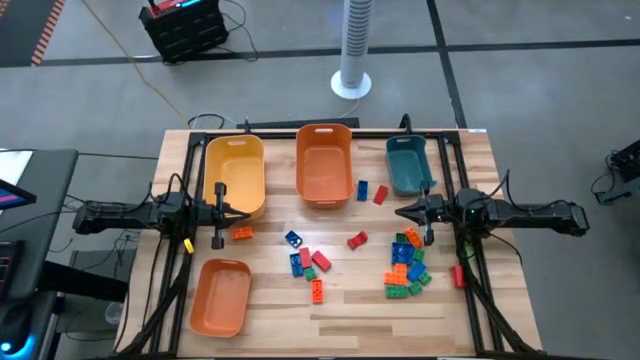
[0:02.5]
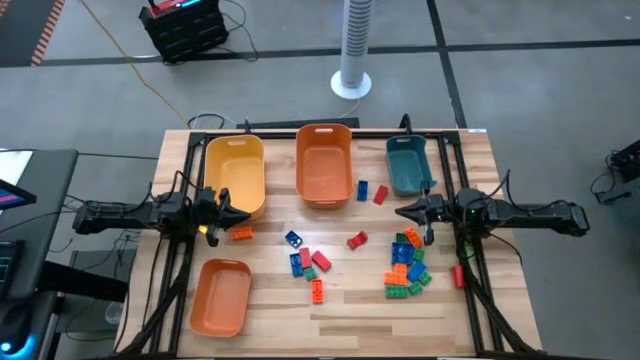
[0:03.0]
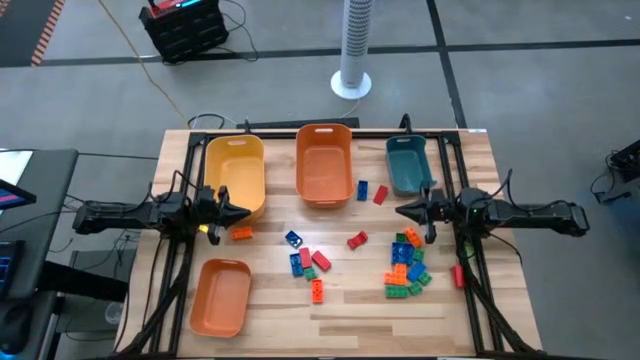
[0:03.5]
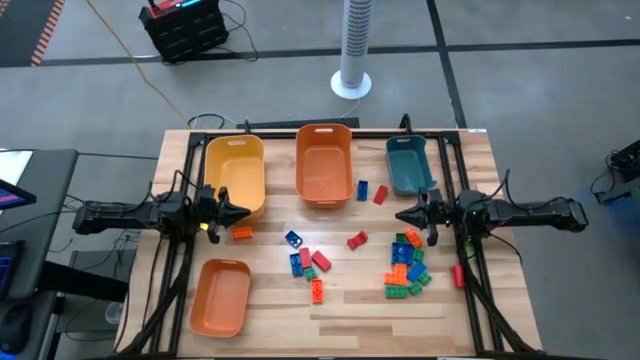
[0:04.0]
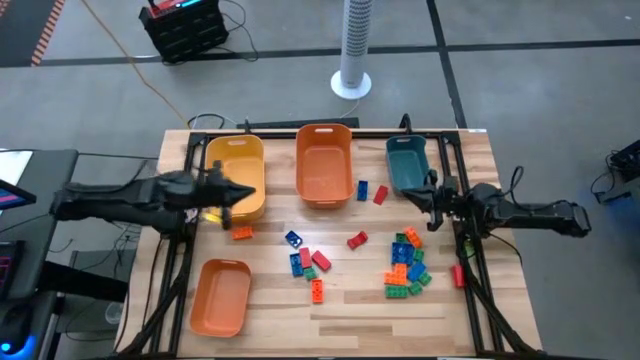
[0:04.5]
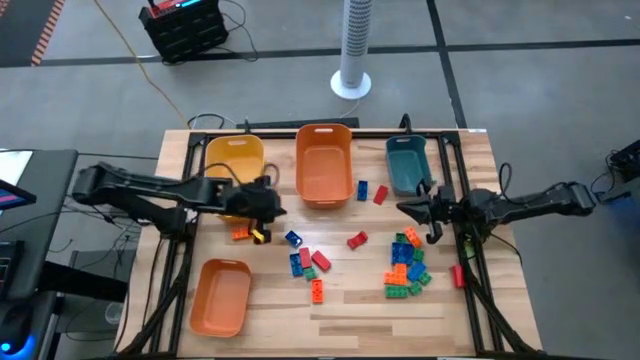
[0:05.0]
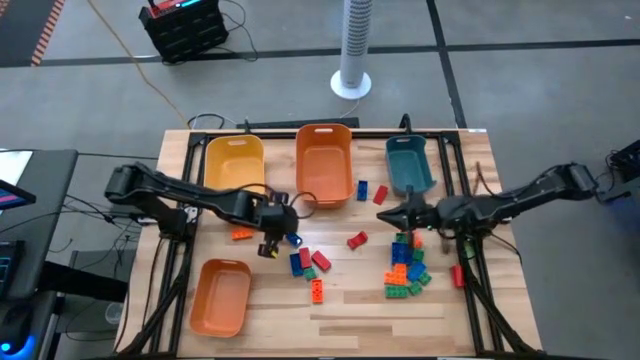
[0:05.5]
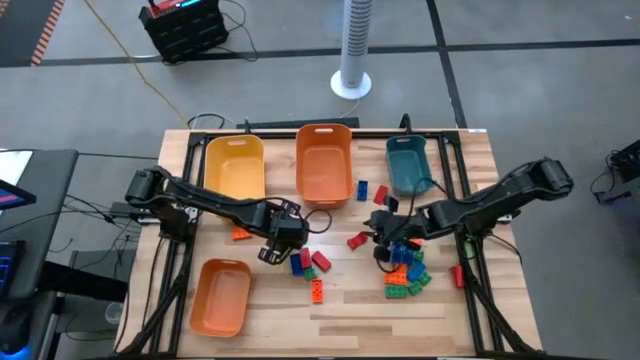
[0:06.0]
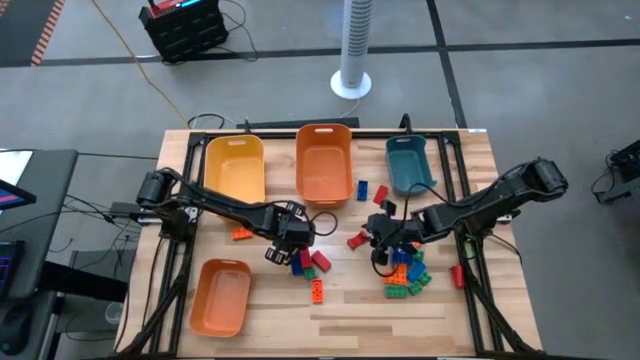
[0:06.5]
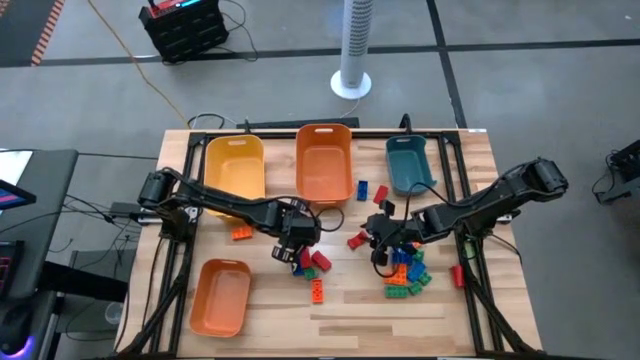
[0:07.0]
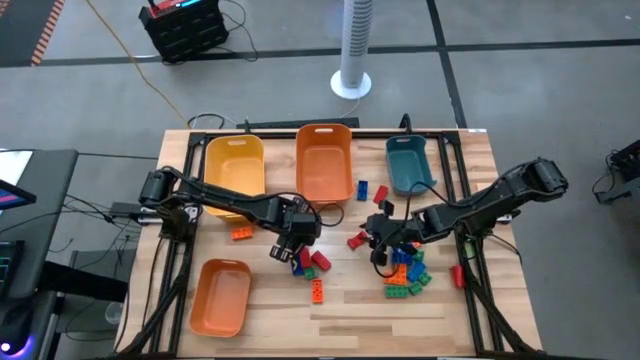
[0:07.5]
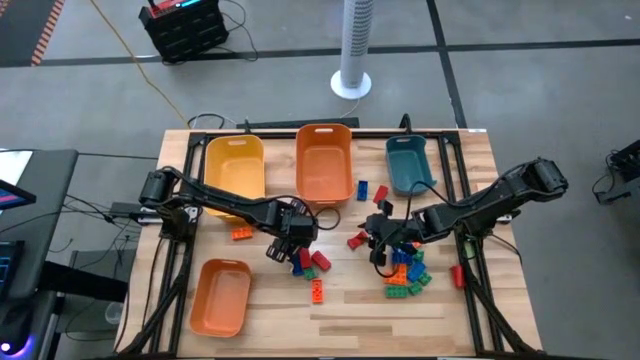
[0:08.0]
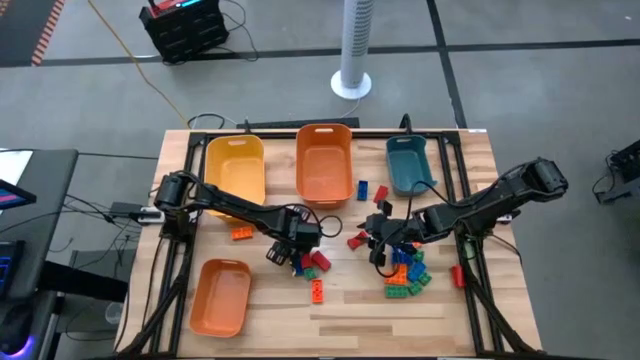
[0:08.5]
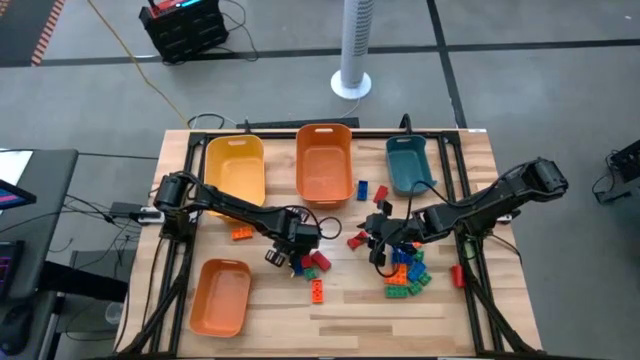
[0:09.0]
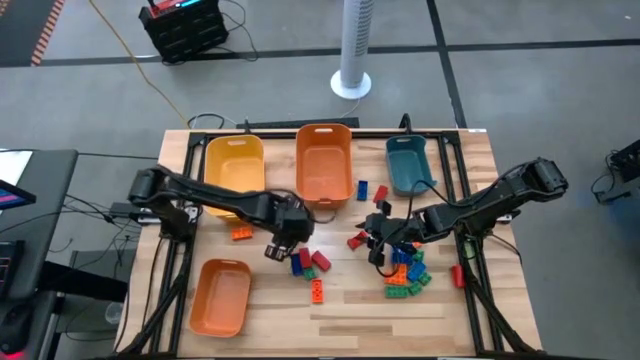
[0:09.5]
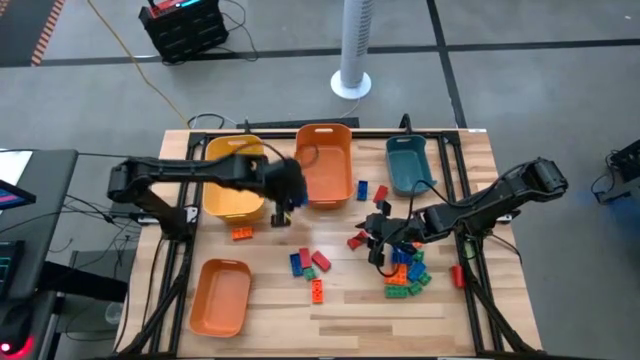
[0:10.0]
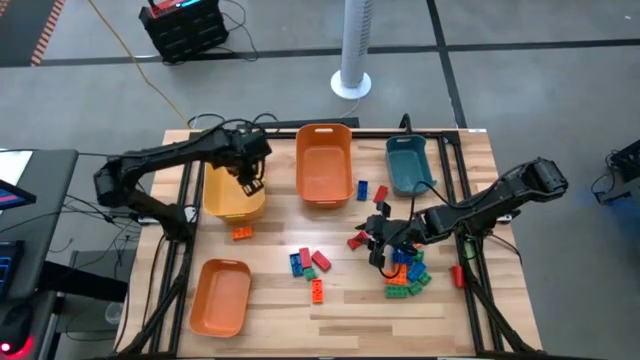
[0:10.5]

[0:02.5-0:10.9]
Task: Sort blocks
Put the blue game piece into the yellow bin

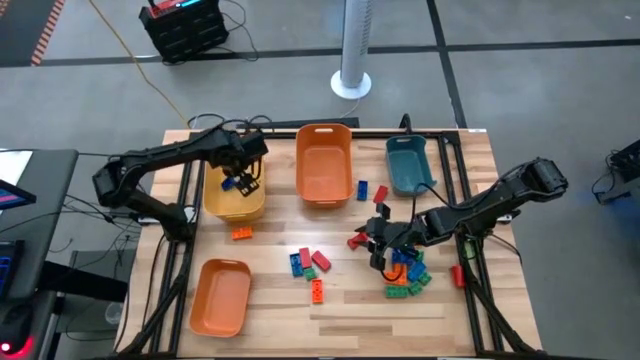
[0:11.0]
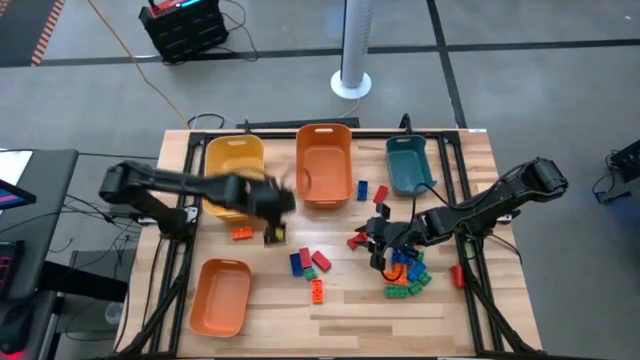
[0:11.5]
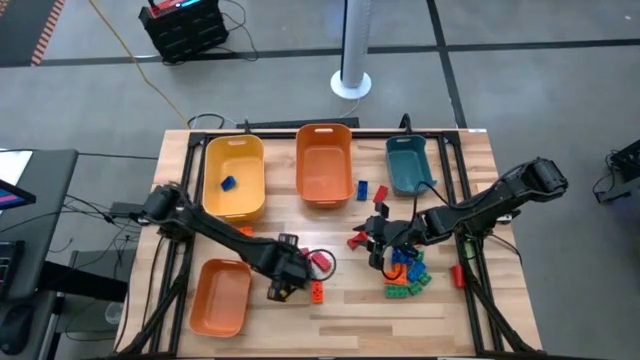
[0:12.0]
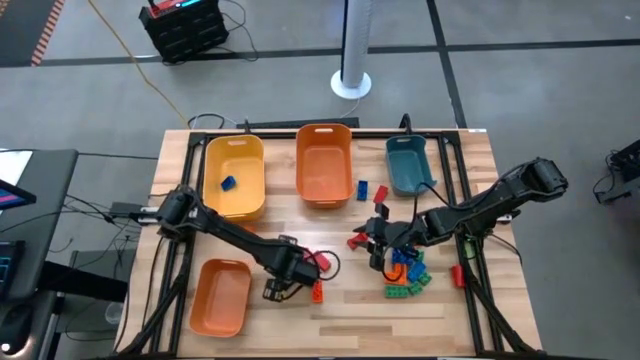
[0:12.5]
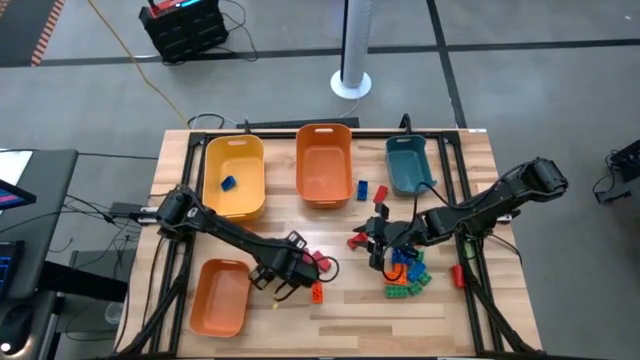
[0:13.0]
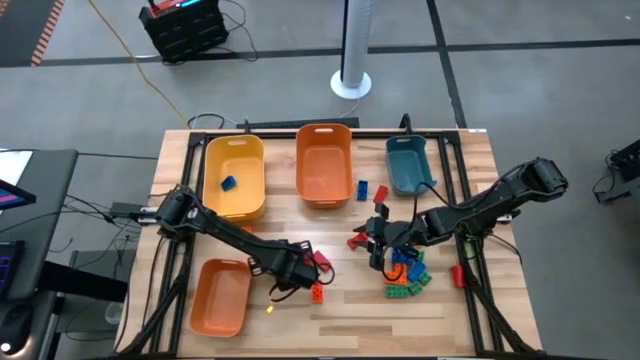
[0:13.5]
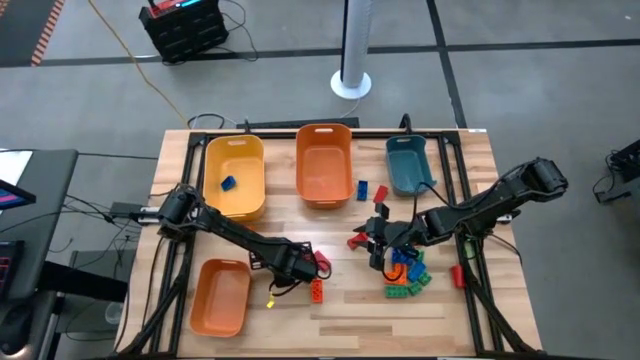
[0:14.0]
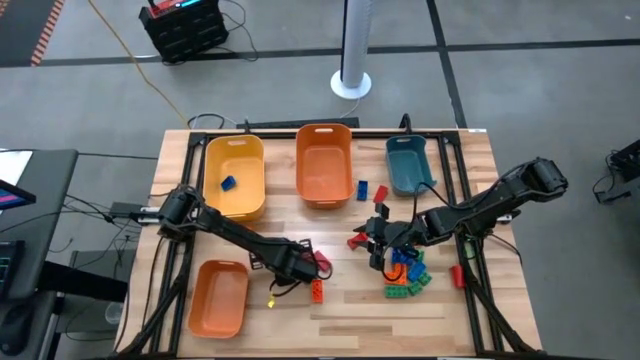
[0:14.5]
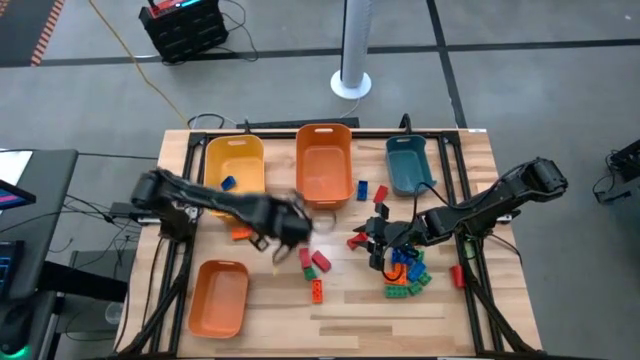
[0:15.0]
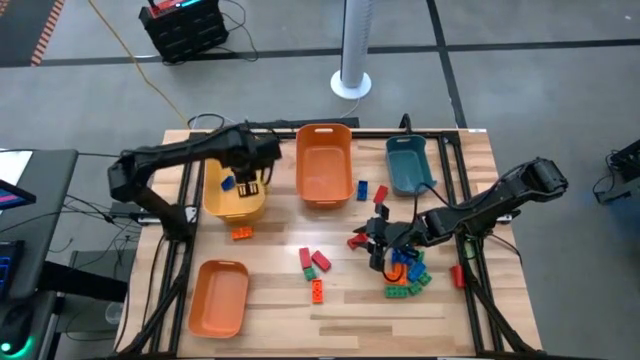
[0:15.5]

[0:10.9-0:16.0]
Put the blue game piece into the yellow bin

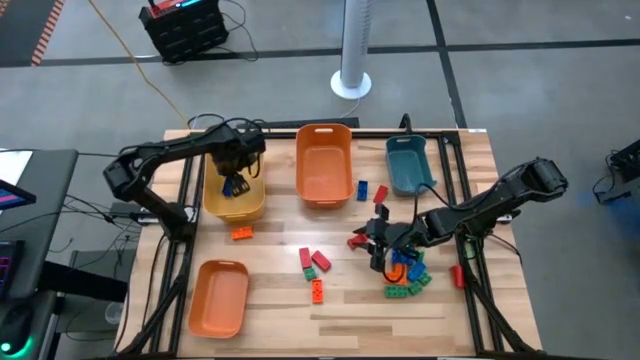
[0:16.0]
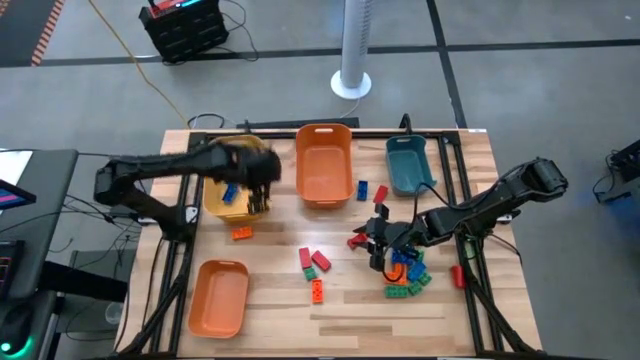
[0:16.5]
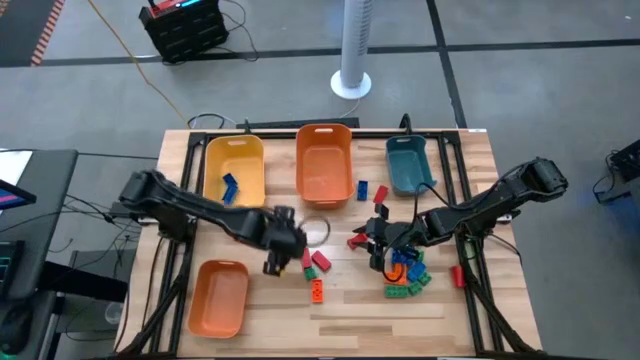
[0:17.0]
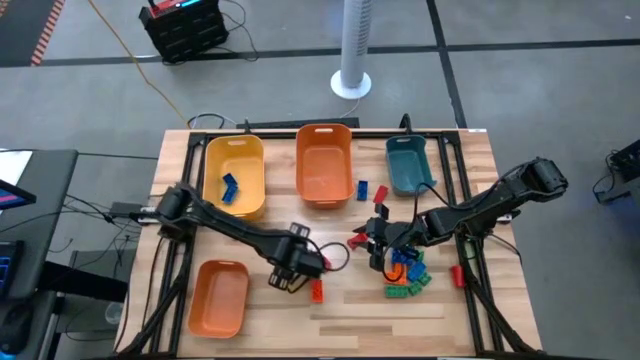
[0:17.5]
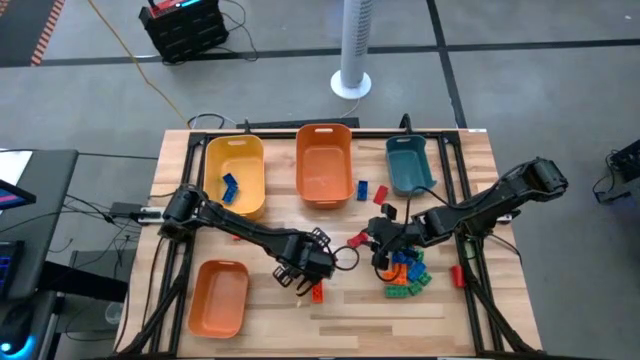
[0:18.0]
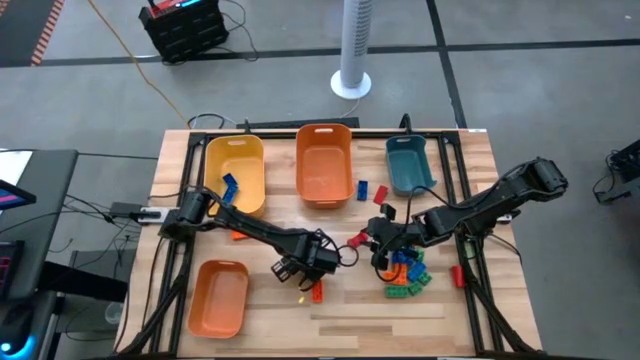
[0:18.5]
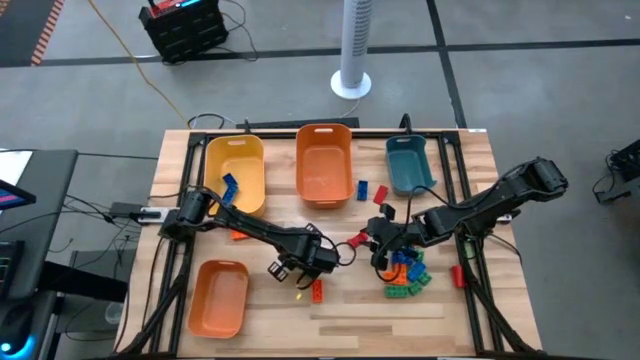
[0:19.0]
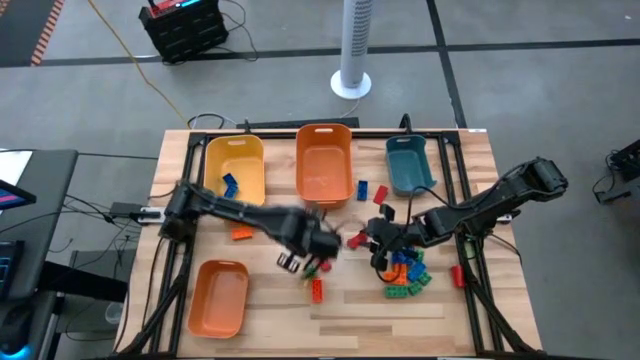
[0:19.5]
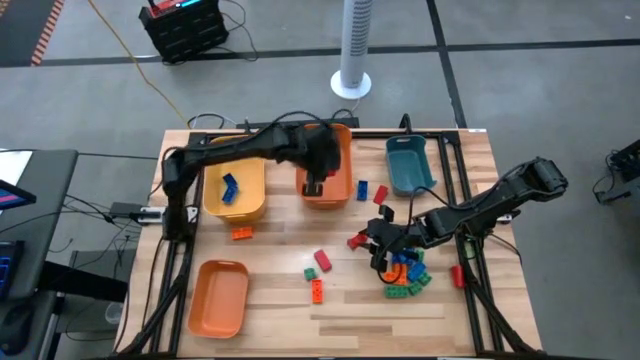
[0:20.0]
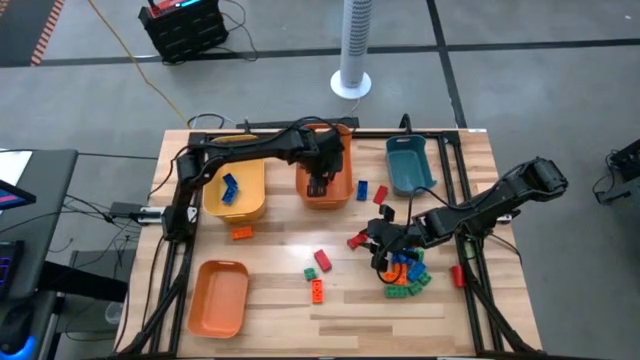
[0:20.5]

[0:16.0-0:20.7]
Put the red wooden block into the top orange bin

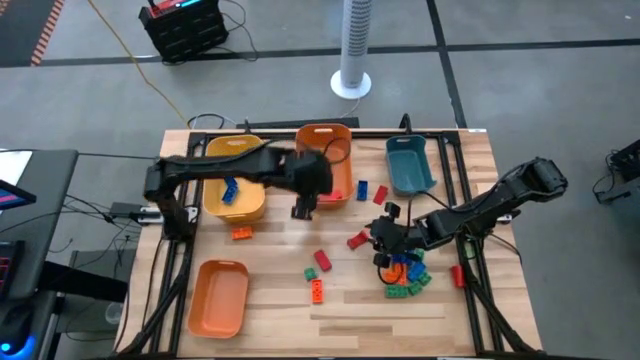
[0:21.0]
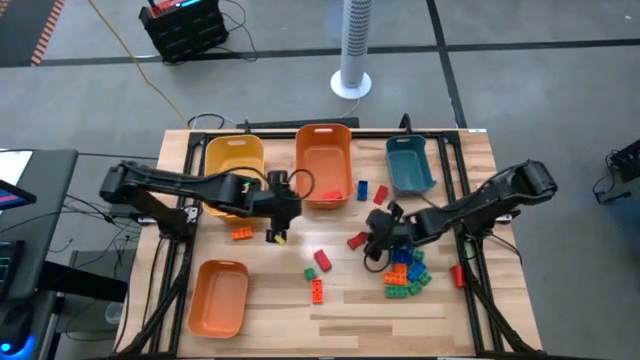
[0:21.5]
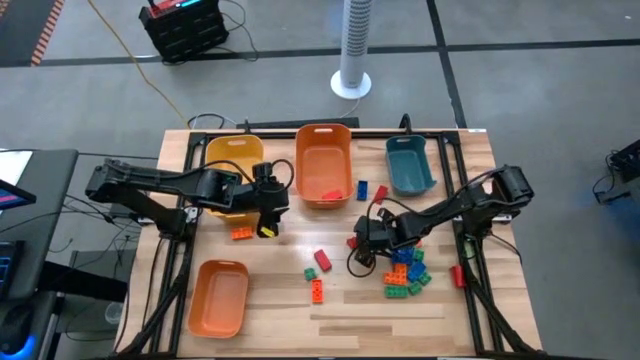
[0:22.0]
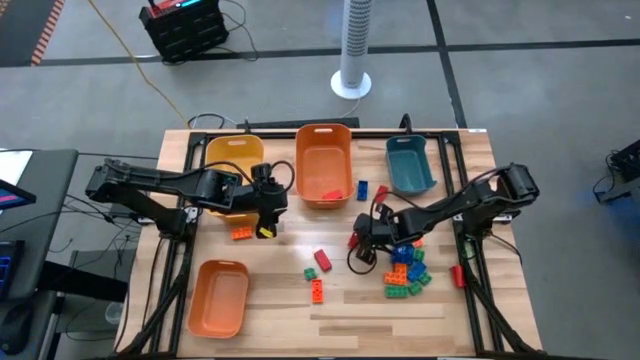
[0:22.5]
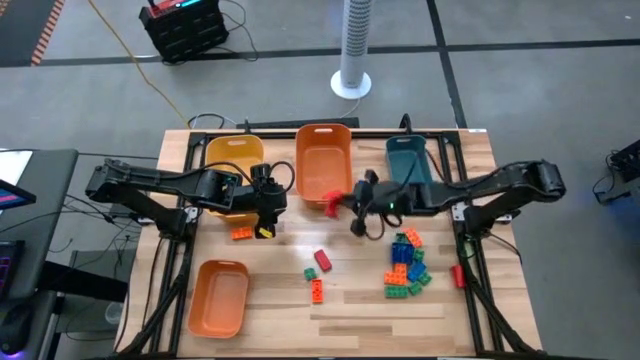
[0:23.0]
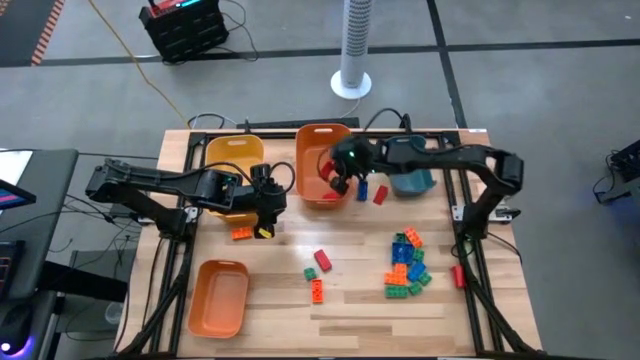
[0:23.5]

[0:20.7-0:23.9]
Put the red wooden block into the top orange bin
